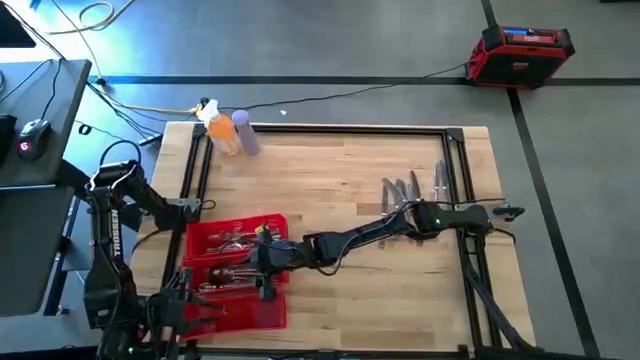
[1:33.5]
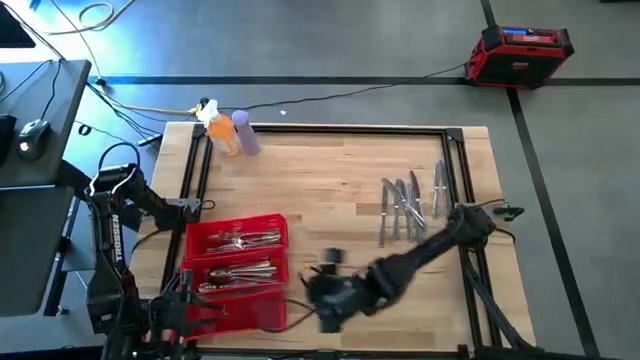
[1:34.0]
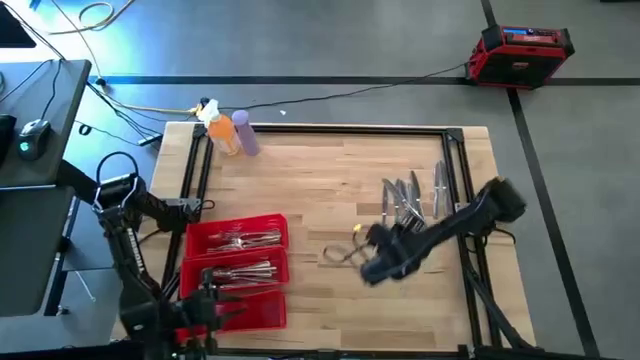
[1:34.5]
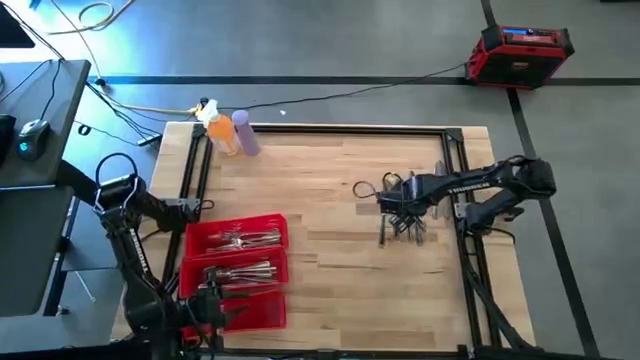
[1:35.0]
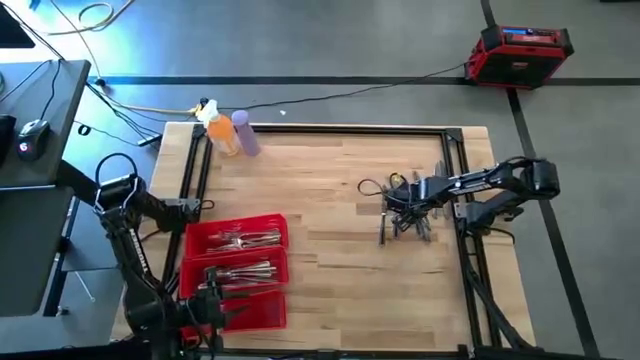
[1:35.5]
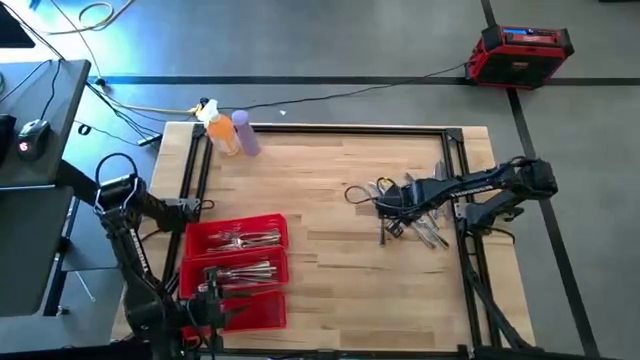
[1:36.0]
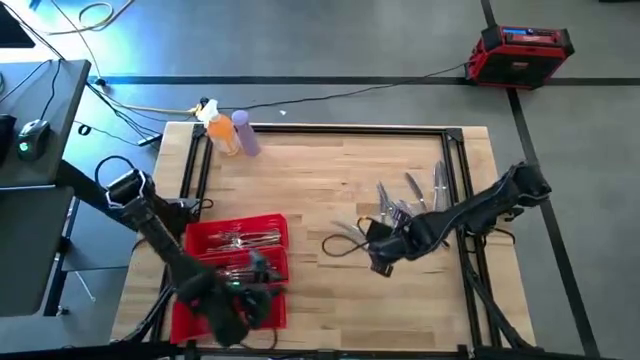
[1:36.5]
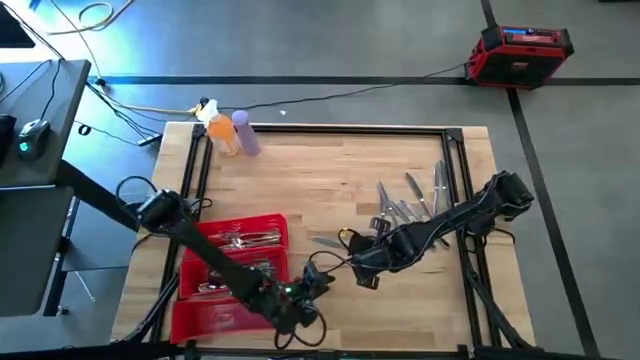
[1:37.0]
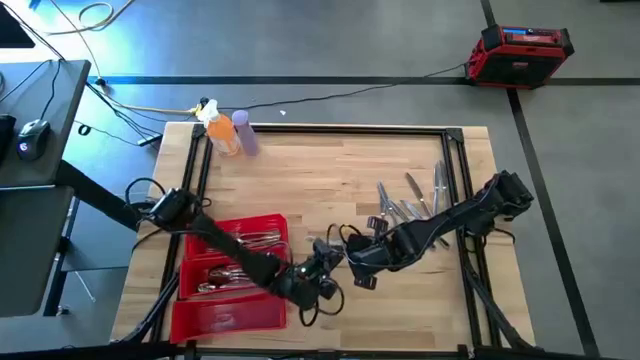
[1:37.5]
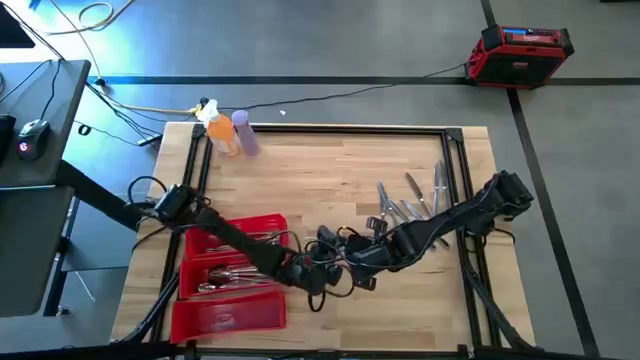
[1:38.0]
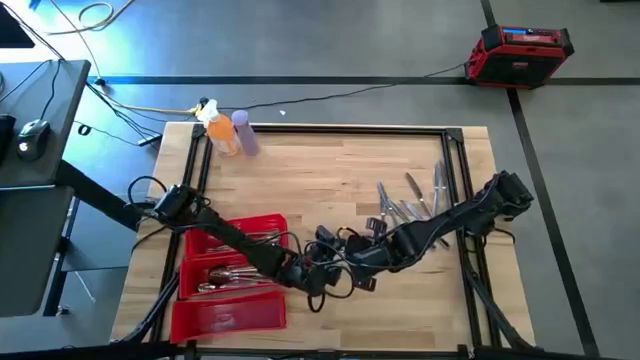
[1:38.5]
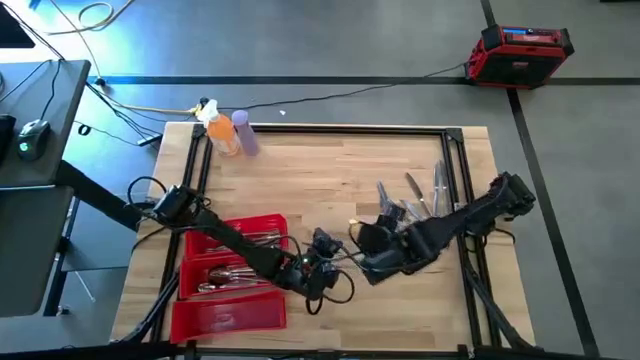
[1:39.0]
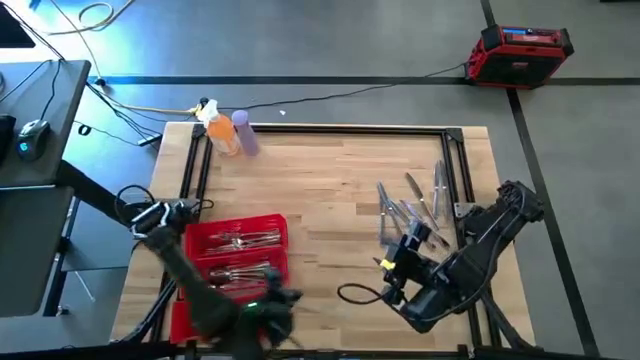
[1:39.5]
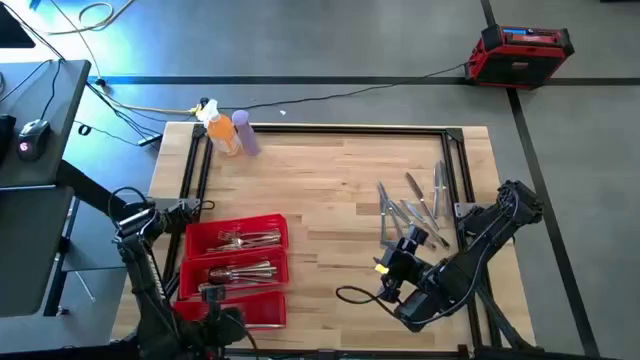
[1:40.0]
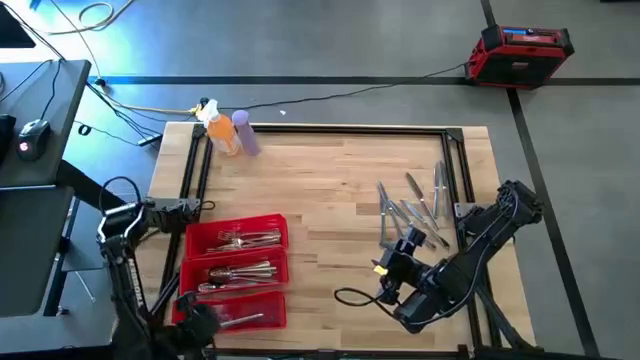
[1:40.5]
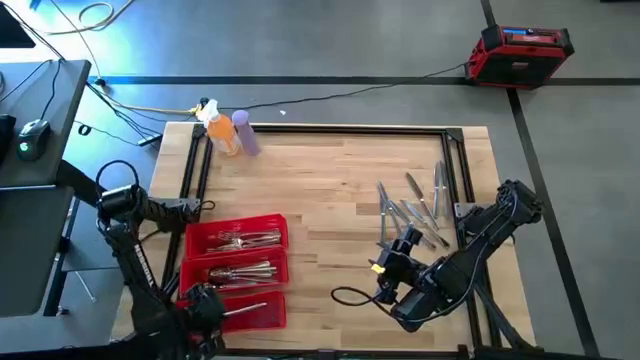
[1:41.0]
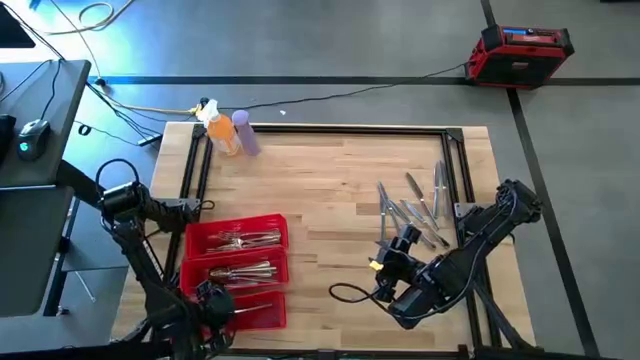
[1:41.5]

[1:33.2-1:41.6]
Task: Sort silverware
Put the silver knife in the bottom red bin

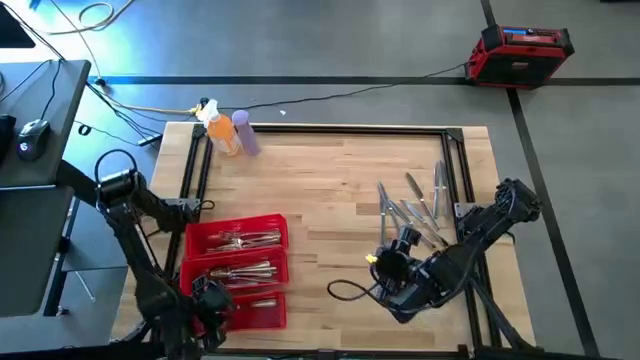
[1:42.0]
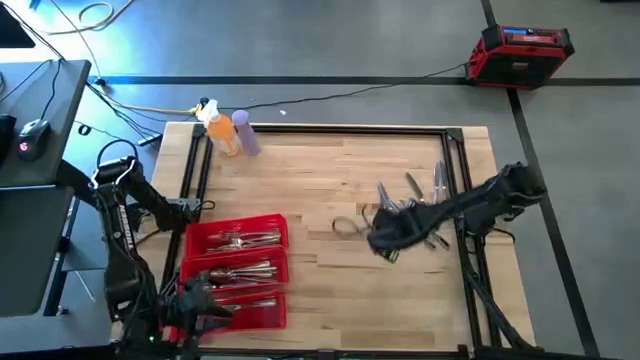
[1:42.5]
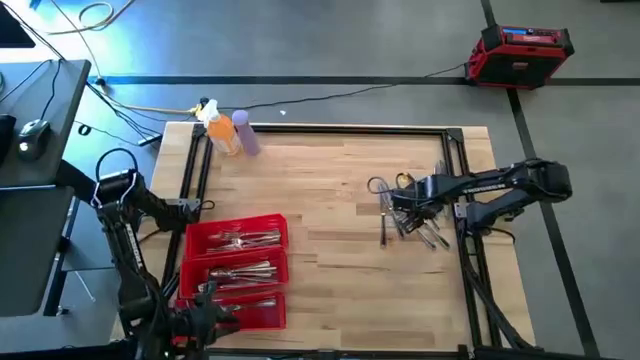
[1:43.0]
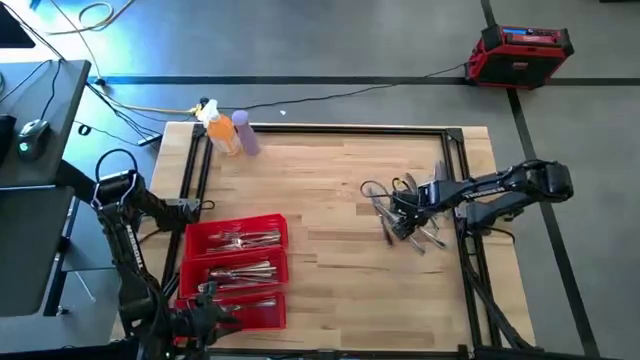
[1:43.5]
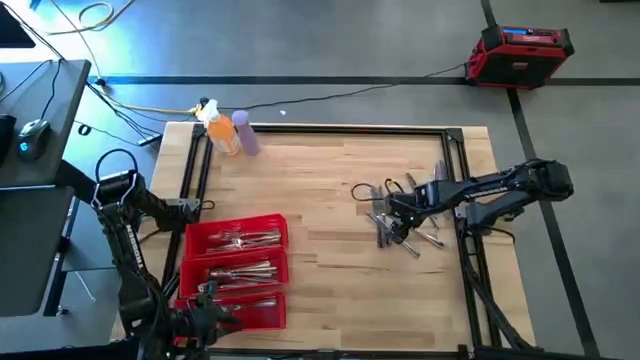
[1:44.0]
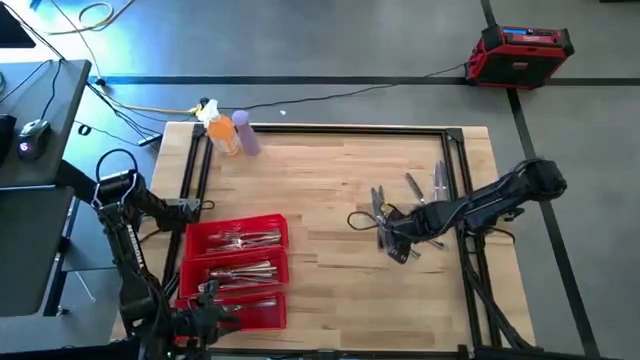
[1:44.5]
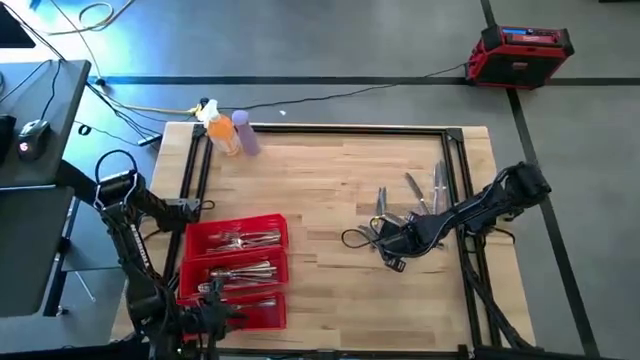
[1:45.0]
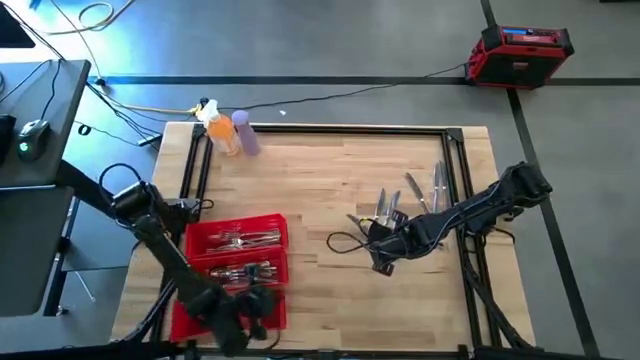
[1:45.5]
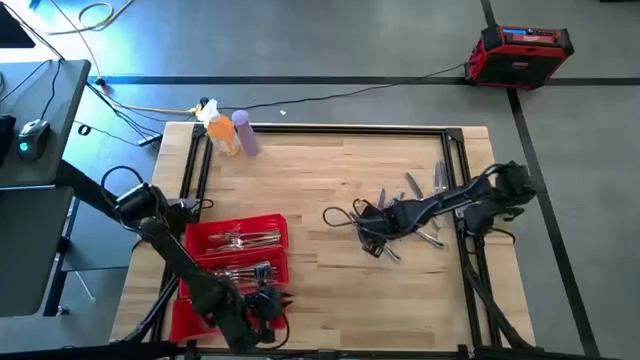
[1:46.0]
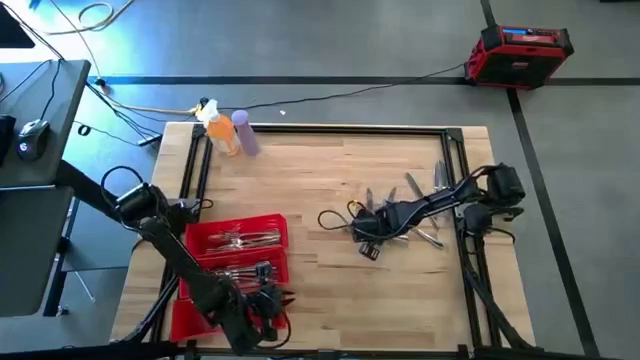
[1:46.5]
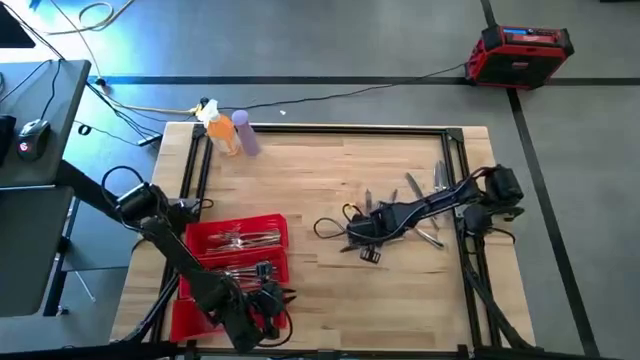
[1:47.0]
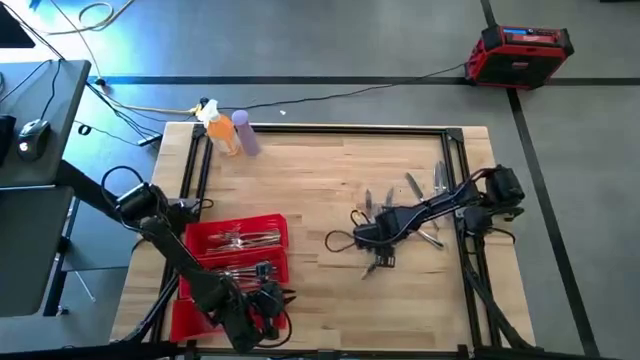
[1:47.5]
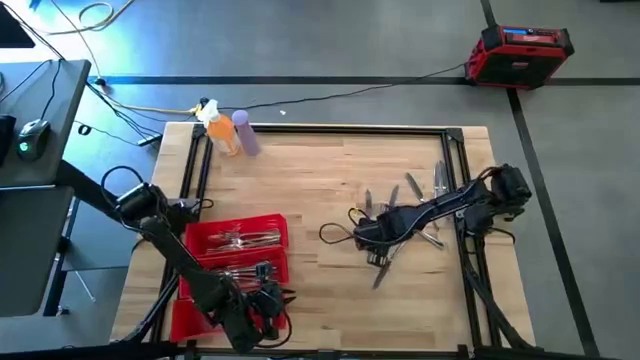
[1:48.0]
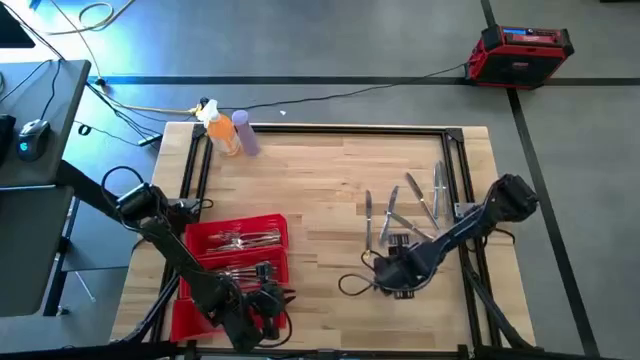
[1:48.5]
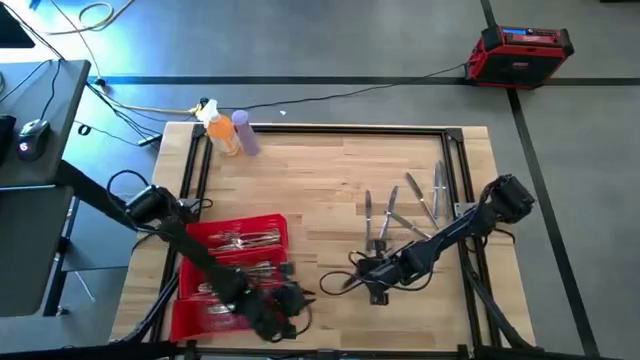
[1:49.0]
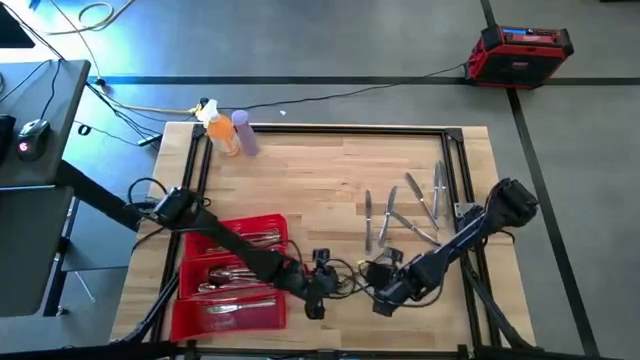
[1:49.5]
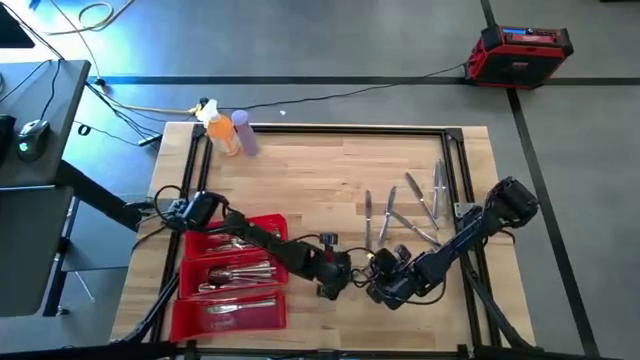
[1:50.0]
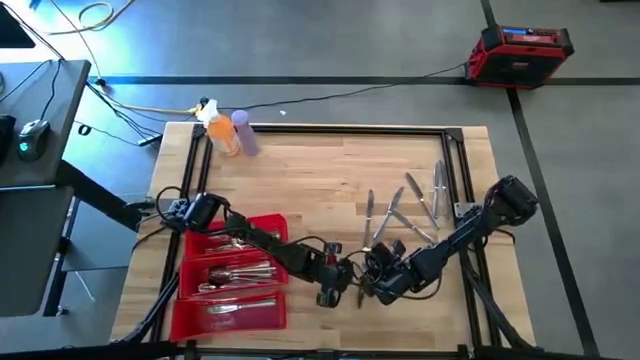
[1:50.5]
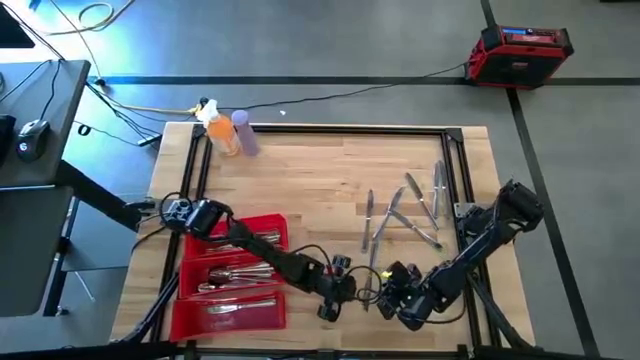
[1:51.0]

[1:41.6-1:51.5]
Put the silver knife in the bottom red bin

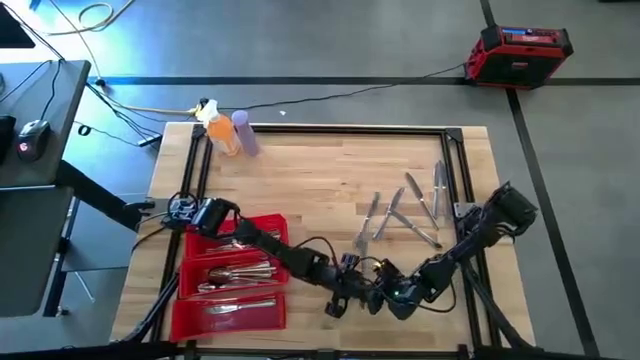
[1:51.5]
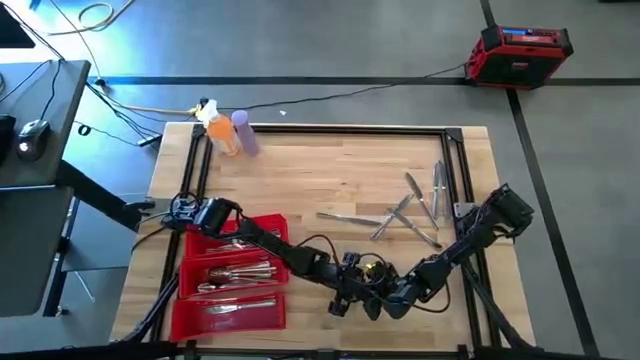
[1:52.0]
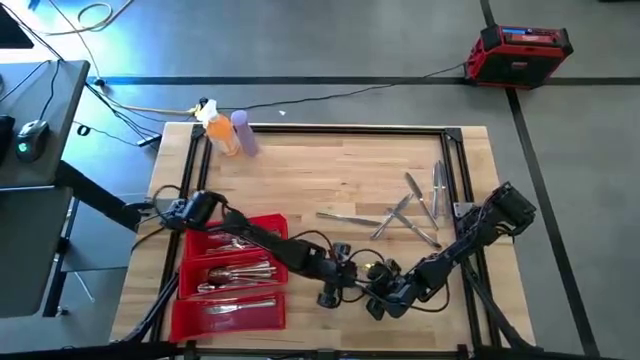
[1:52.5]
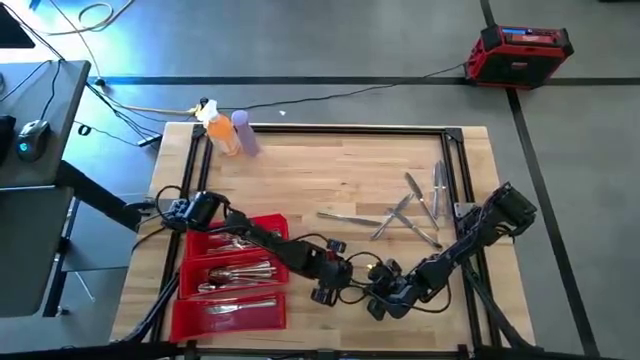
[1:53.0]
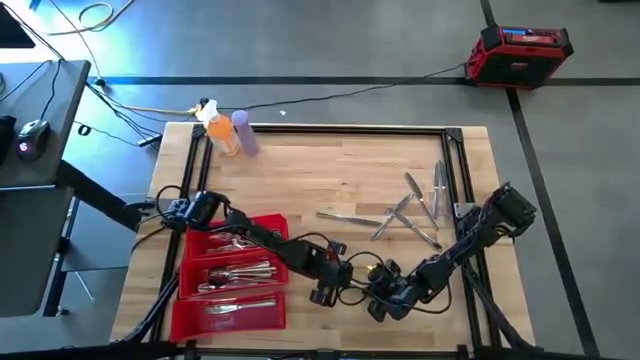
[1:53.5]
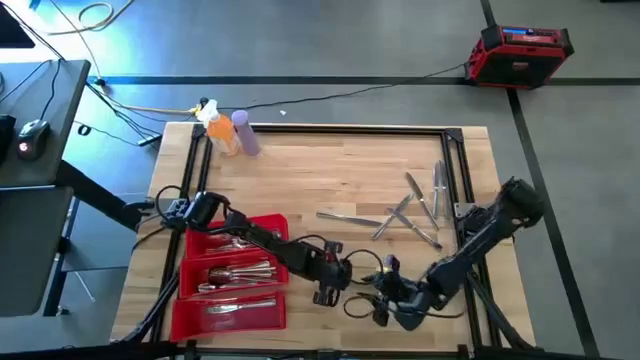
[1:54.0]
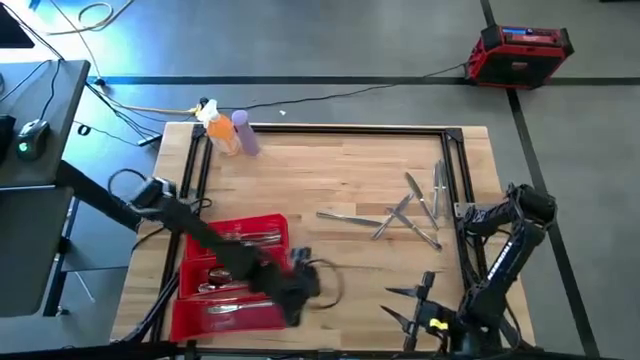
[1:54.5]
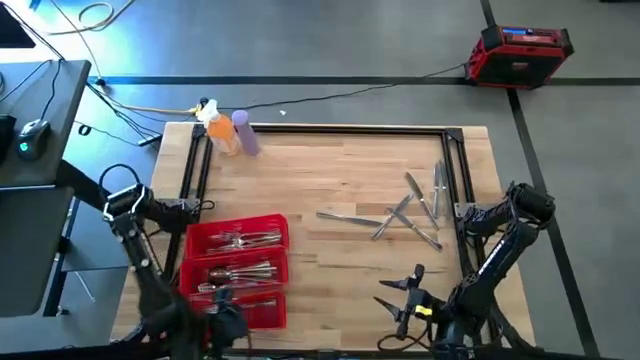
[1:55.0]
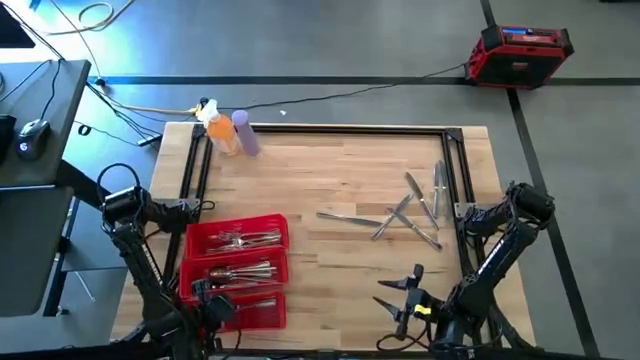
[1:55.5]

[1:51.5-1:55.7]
Put the silver knife in the bottom red bin
